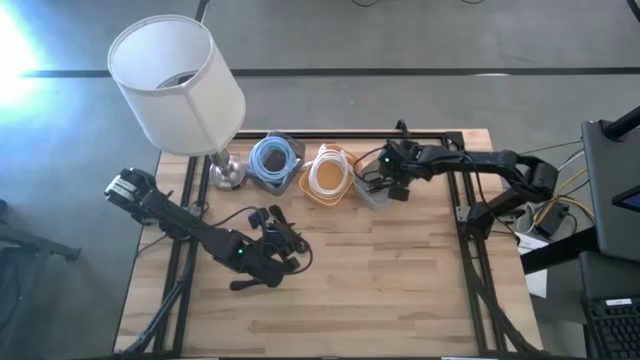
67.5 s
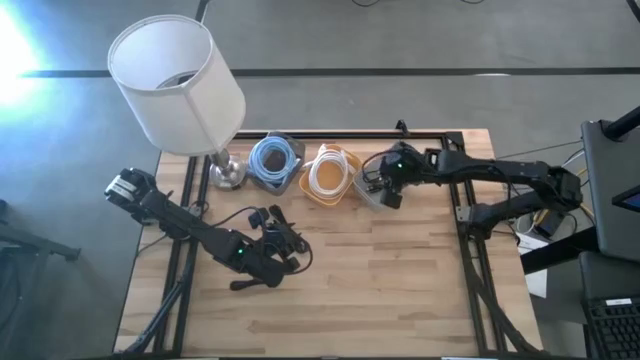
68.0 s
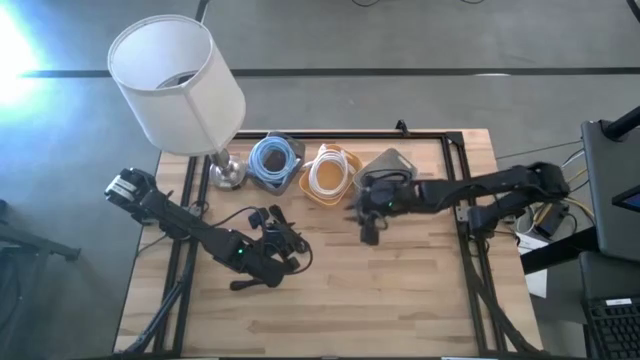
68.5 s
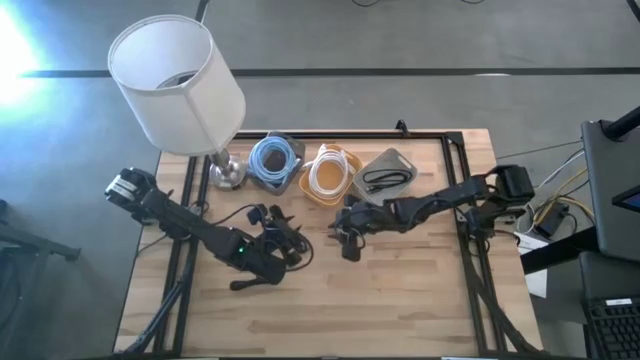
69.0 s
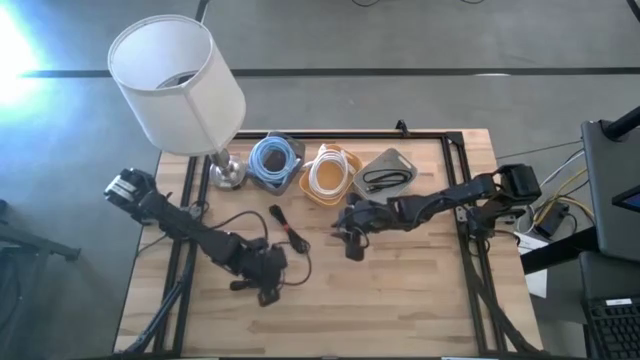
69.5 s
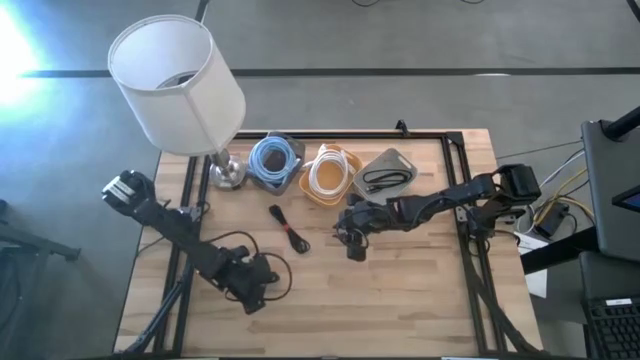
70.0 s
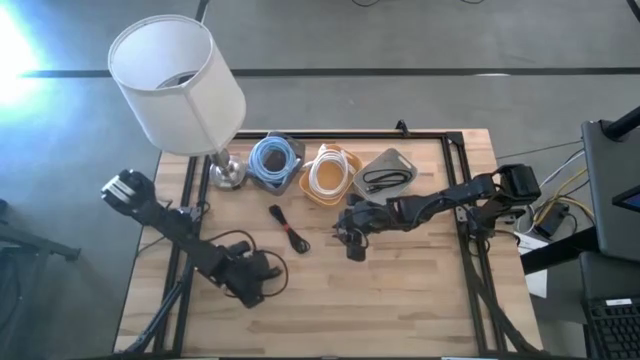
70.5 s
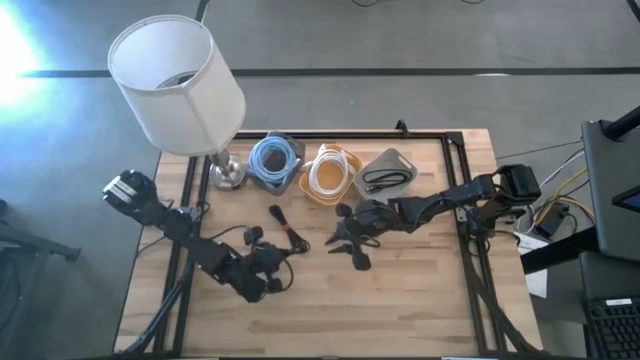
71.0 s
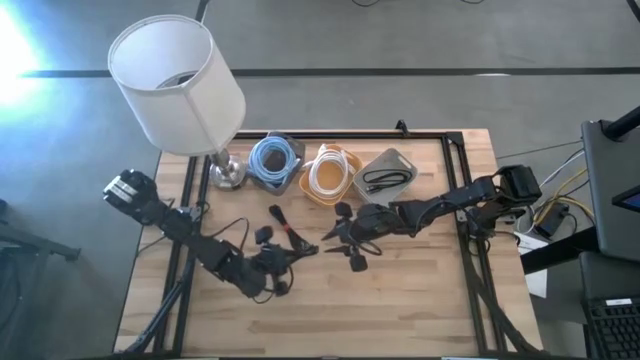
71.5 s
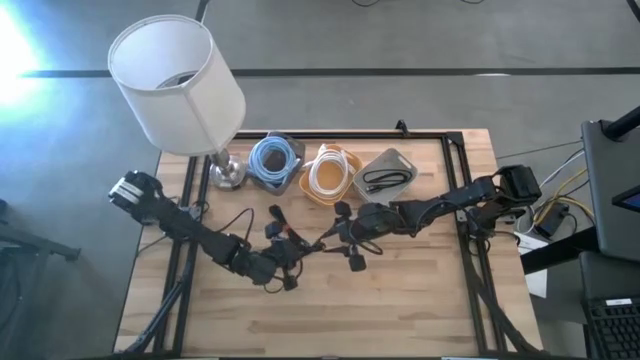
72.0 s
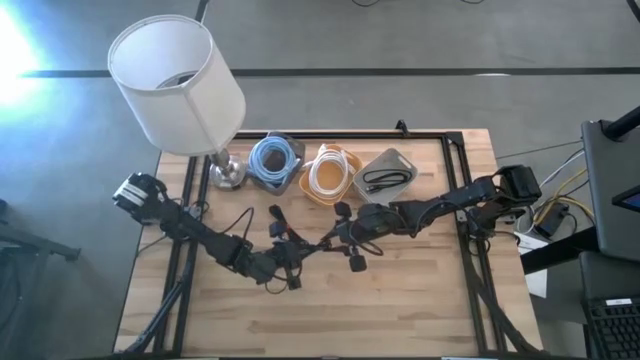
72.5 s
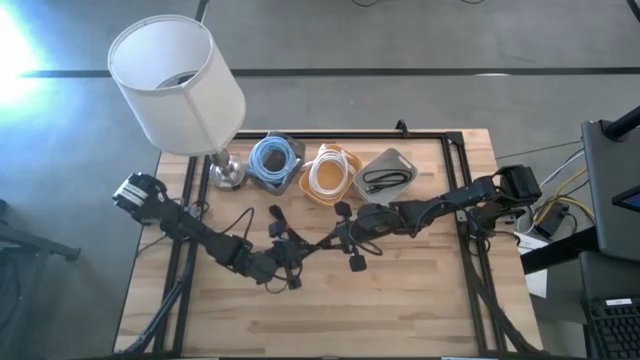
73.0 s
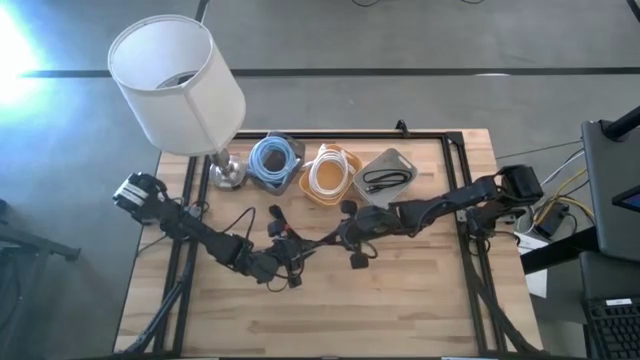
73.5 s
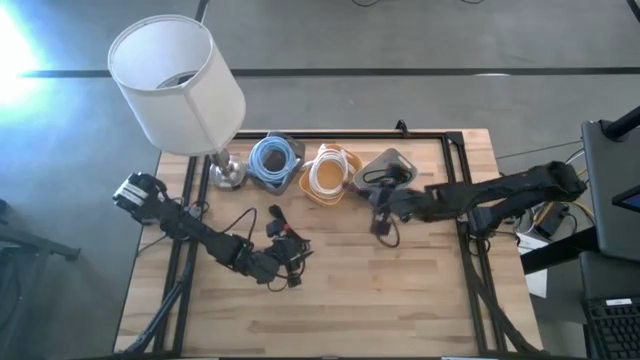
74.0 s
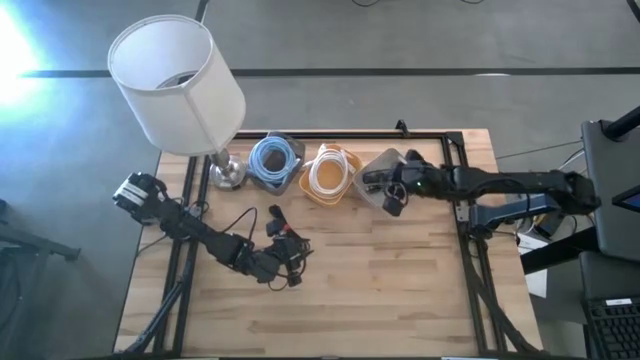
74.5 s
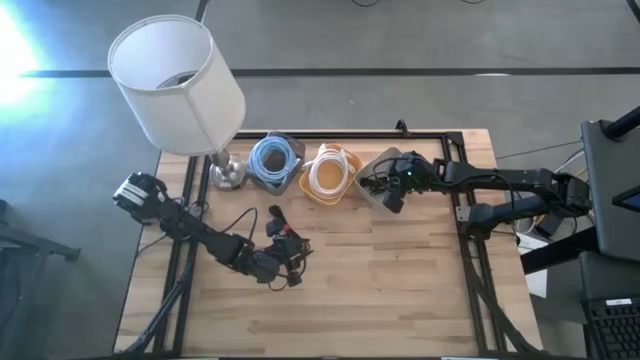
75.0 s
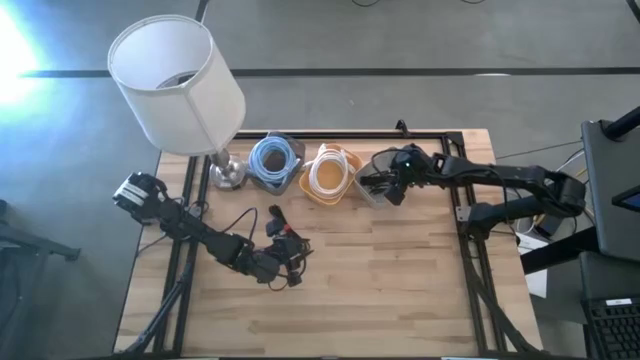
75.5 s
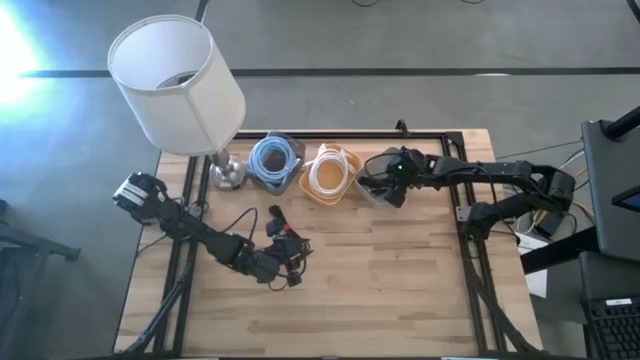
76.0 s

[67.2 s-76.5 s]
Task: Pick & Place USB Port
Put the bottom black charger cable into the gray bin

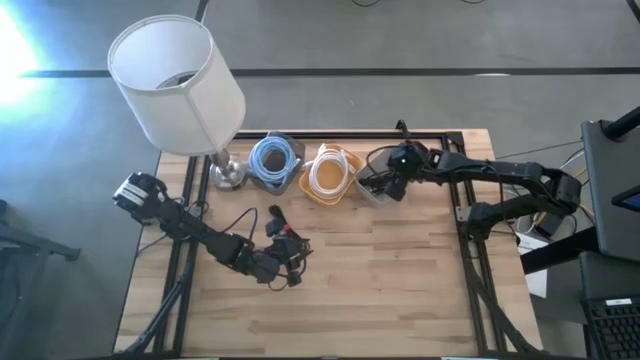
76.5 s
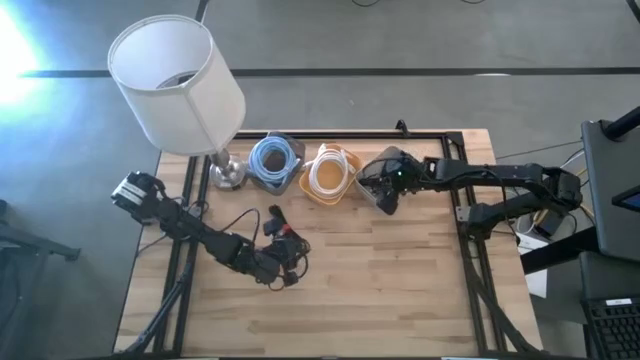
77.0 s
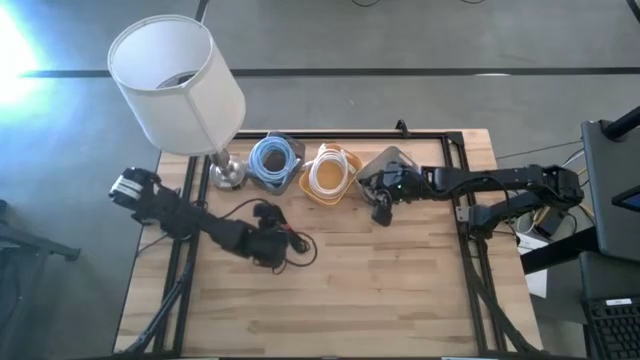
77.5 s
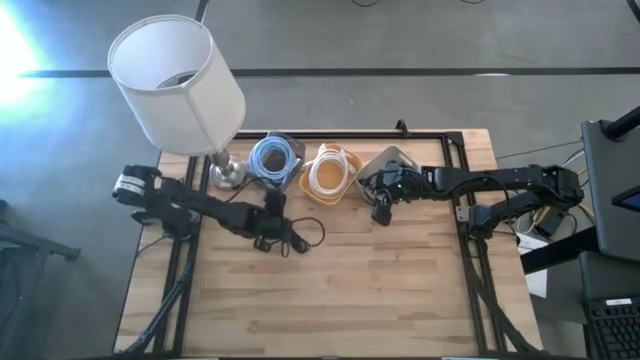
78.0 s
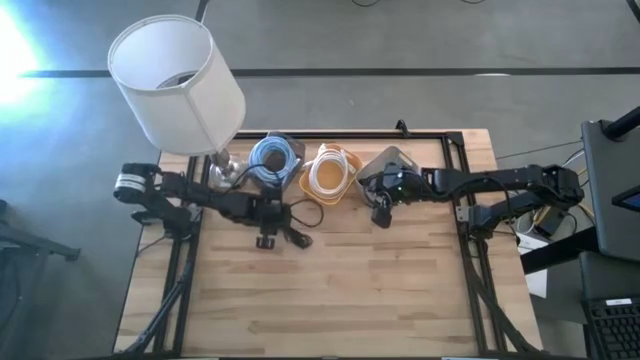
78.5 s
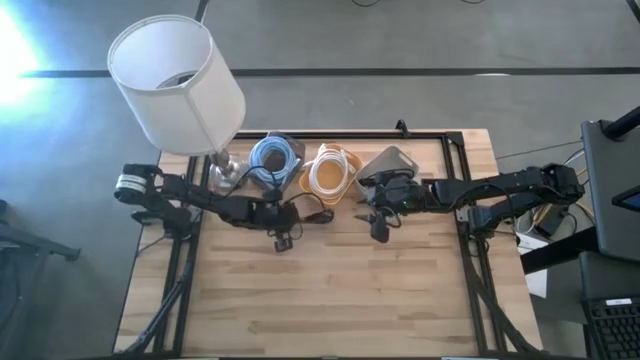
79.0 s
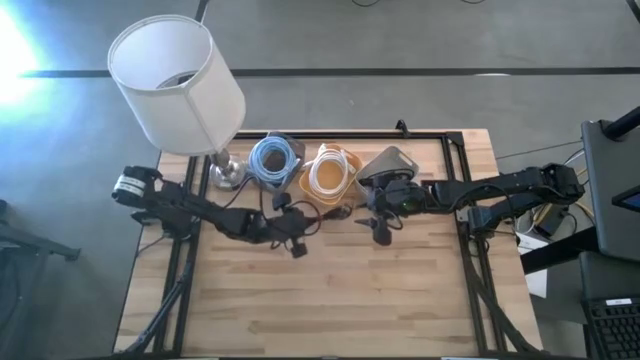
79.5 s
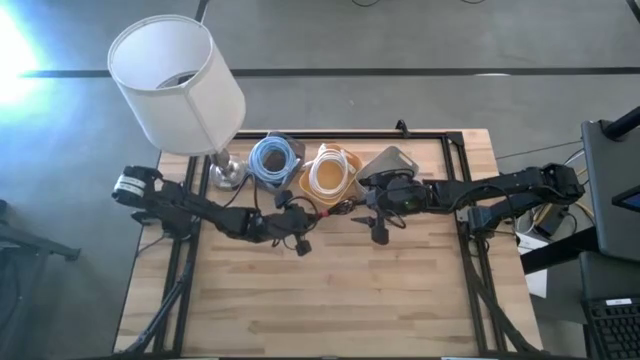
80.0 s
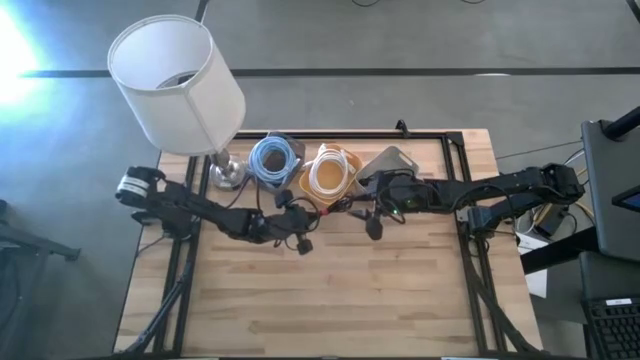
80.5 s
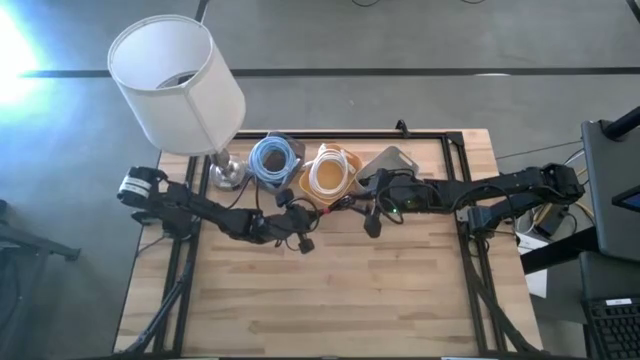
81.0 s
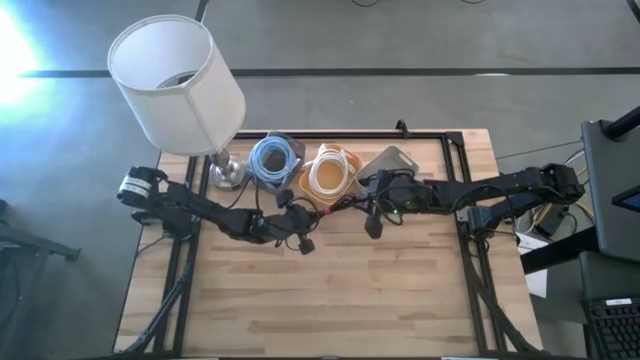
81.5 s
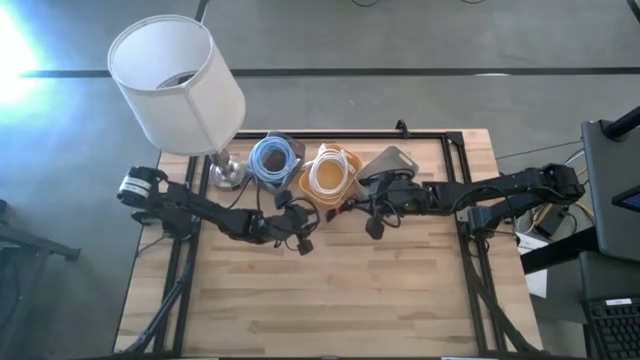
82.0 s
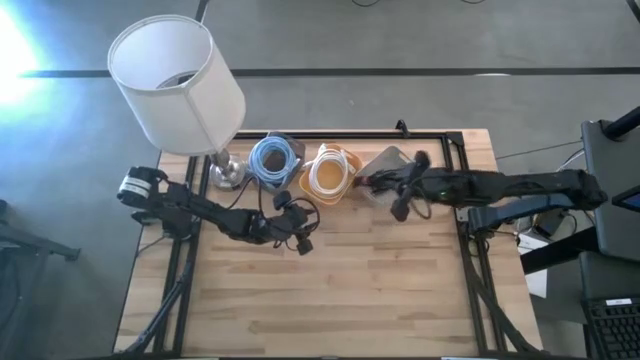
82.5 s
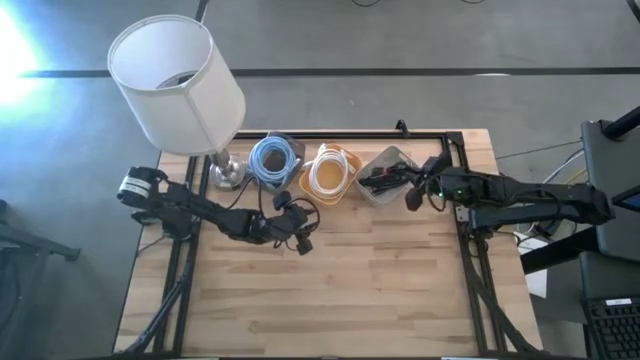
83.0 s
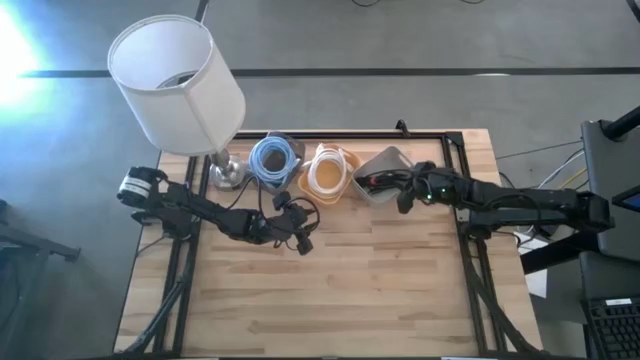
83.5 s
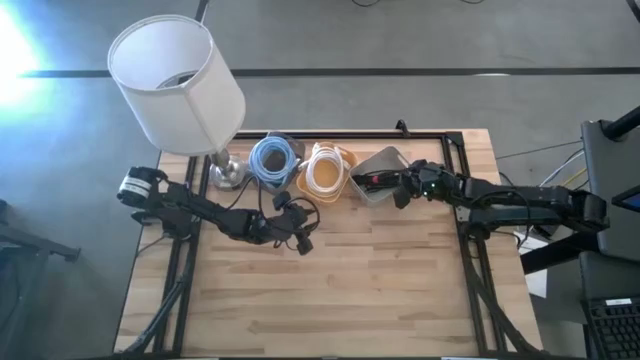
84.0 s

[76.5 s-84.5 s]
Put the black charger cable into the gray bin

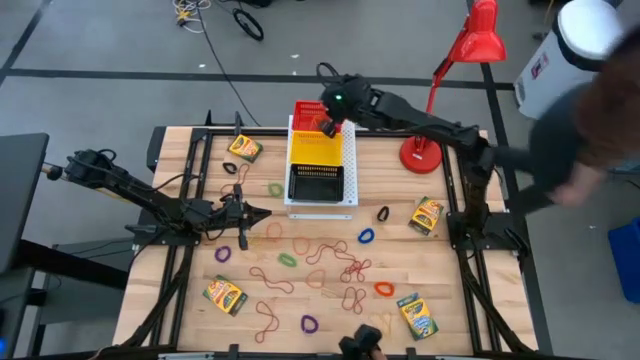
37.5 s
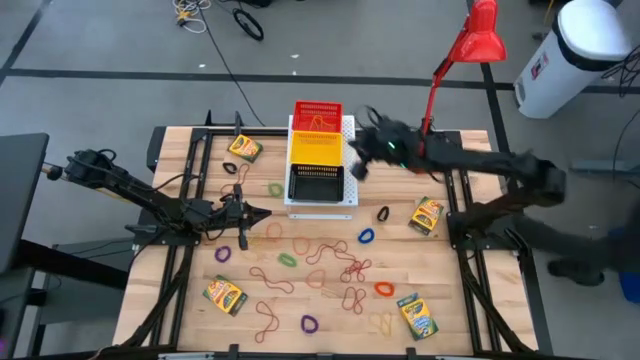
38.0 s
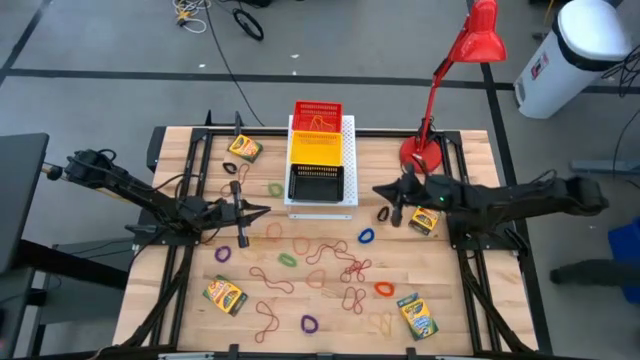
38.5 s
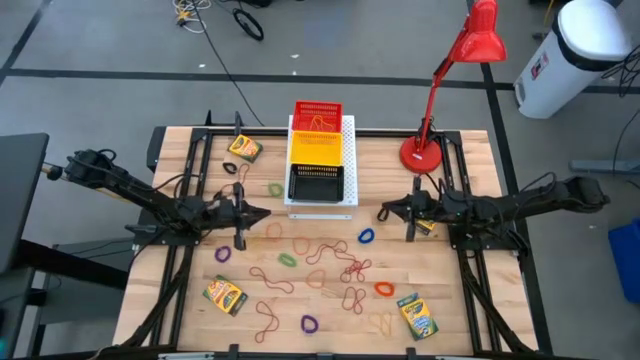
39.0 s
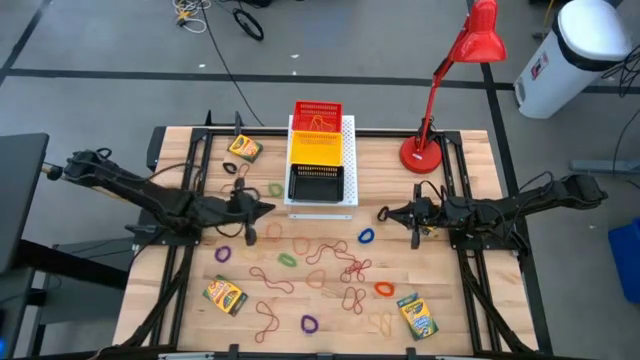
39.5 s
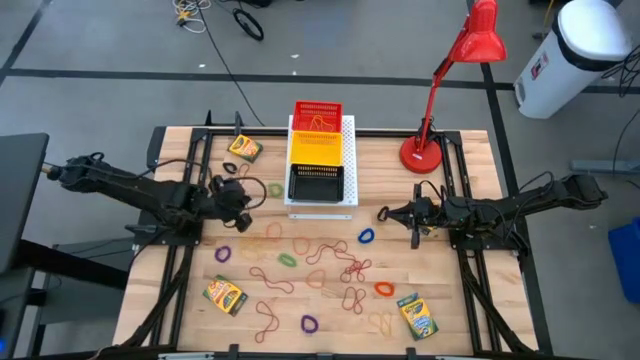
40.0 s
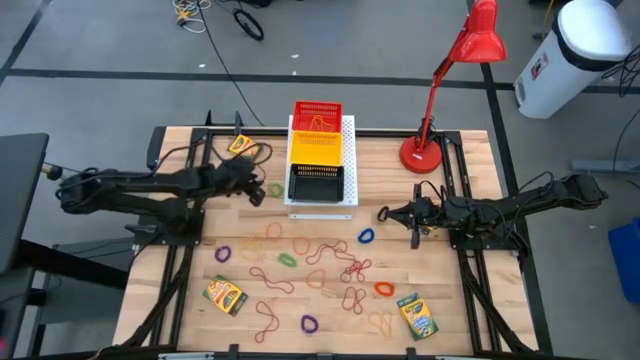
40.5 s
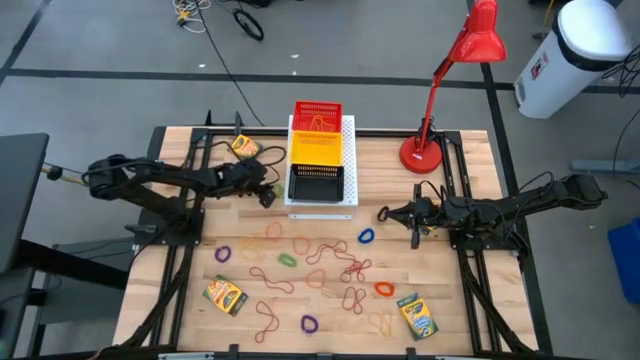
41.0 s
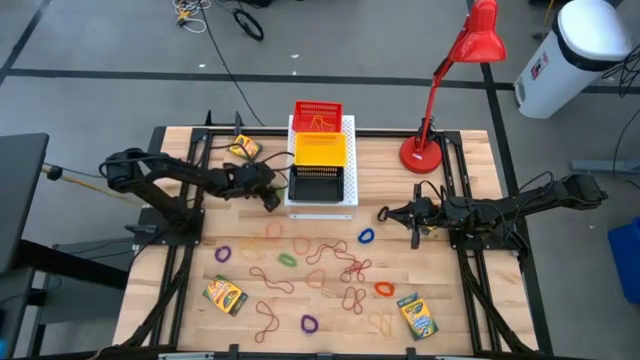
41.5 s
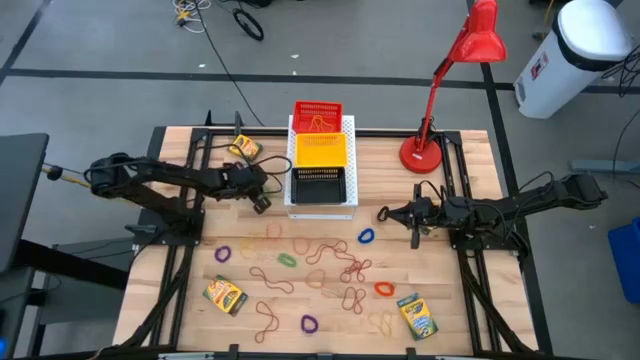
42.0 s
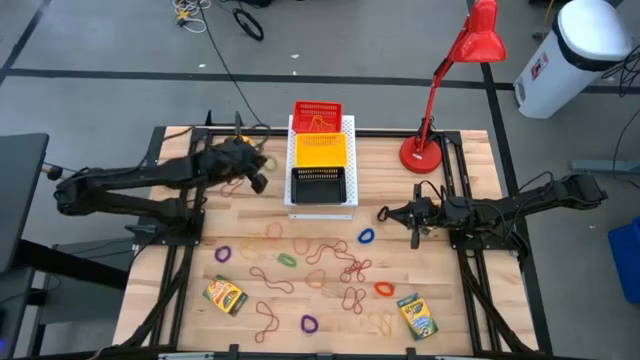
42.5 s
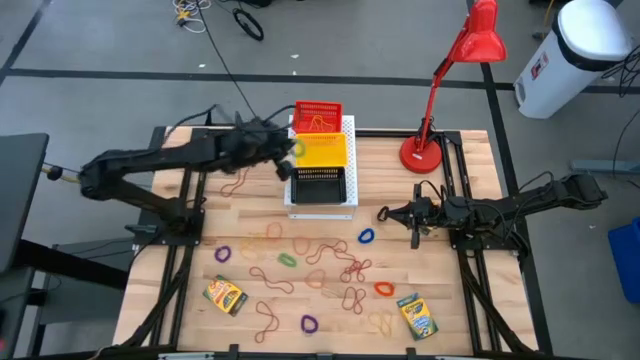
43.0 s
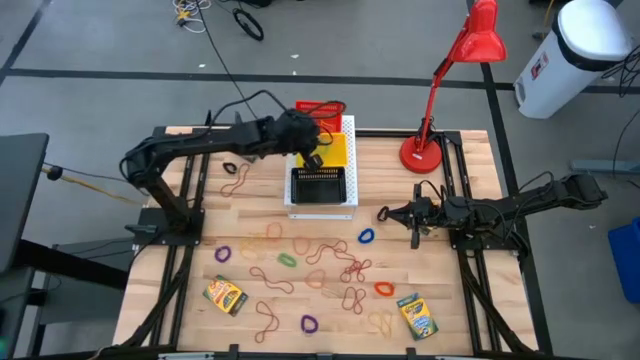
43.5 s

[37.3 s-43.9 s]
Task: Pick & Place Office Desk Supplies
Put the green spring keychain into the yellow bin on the shelf
